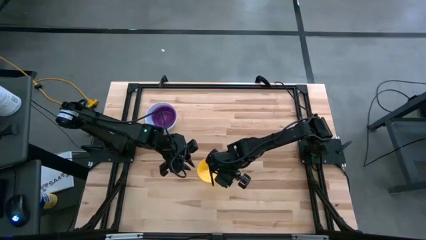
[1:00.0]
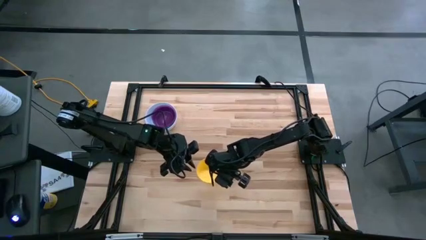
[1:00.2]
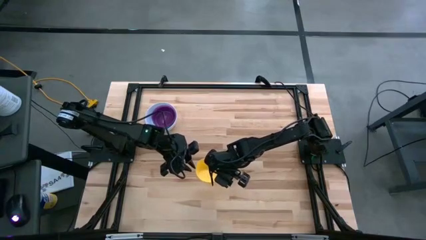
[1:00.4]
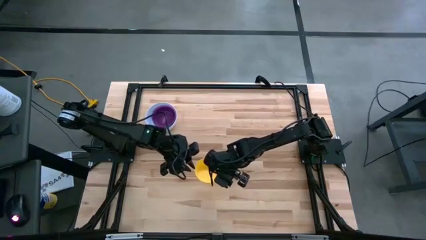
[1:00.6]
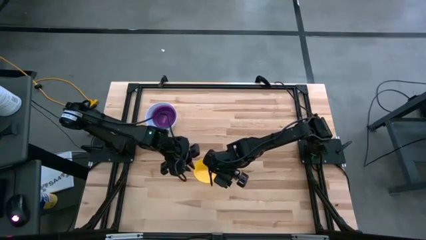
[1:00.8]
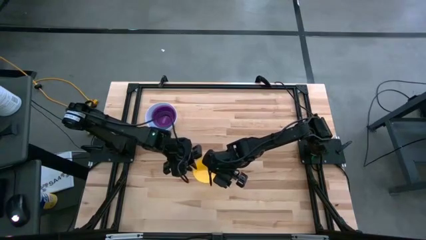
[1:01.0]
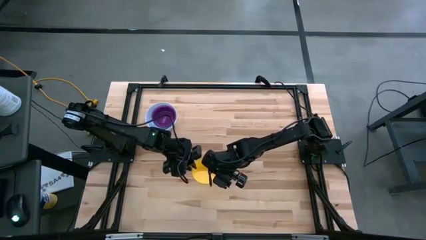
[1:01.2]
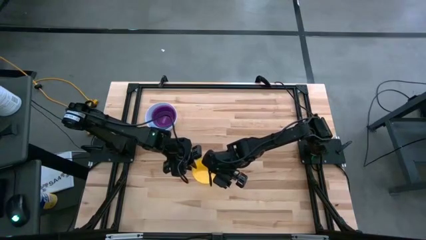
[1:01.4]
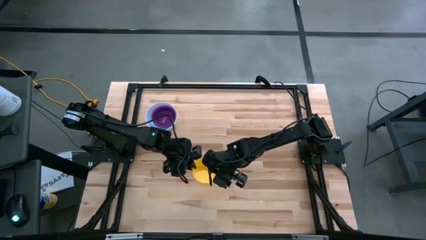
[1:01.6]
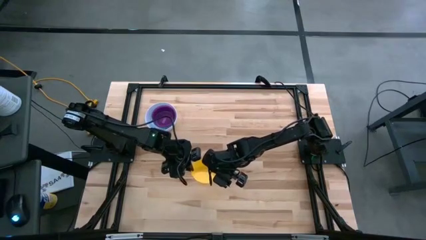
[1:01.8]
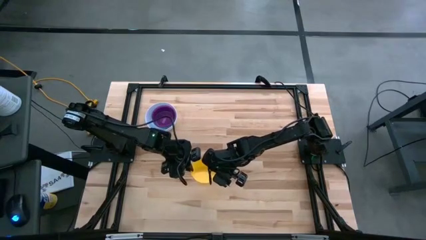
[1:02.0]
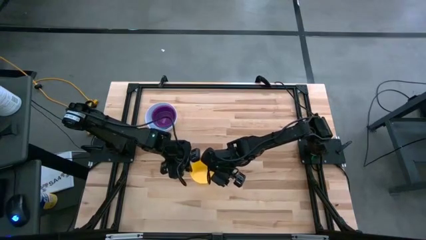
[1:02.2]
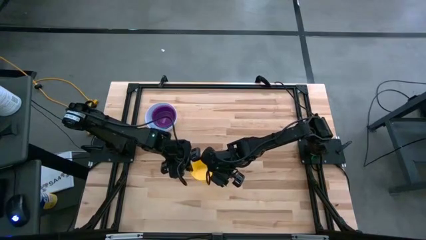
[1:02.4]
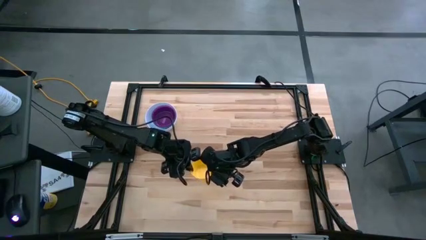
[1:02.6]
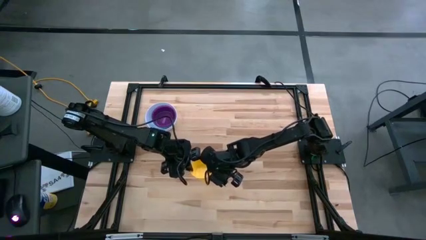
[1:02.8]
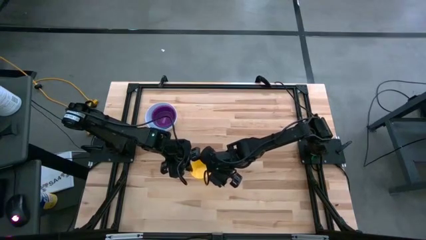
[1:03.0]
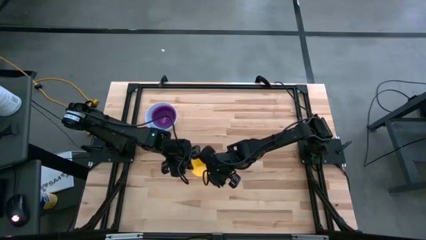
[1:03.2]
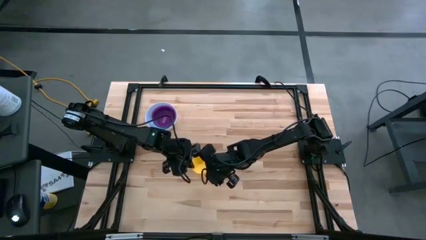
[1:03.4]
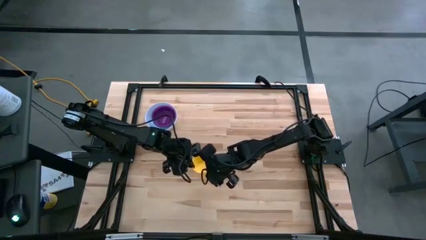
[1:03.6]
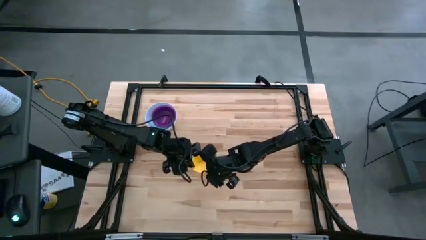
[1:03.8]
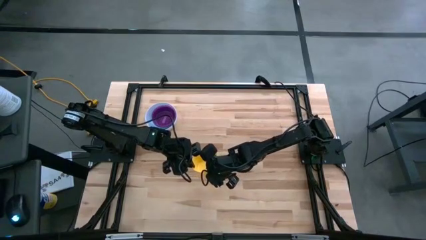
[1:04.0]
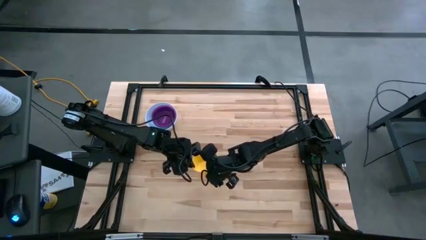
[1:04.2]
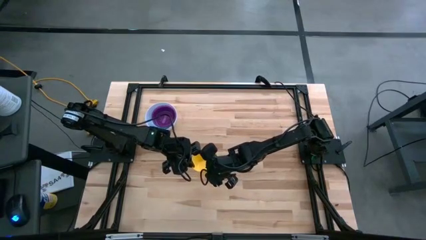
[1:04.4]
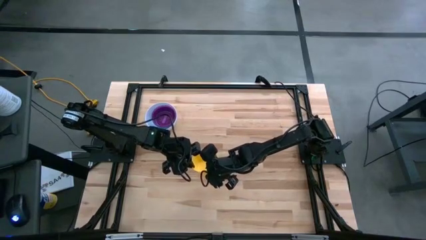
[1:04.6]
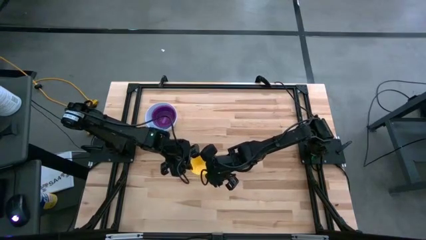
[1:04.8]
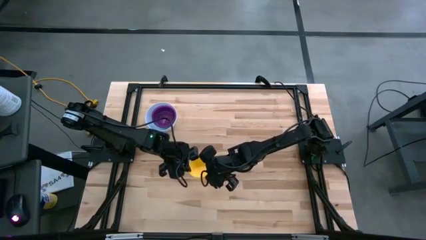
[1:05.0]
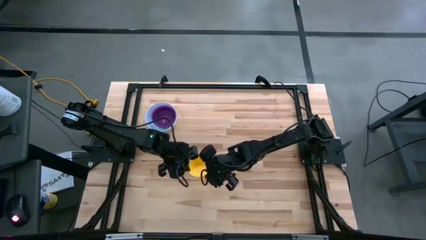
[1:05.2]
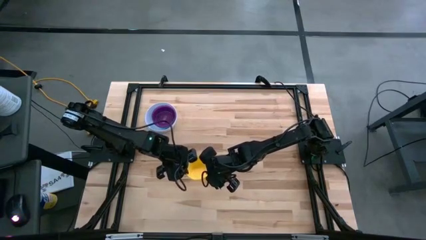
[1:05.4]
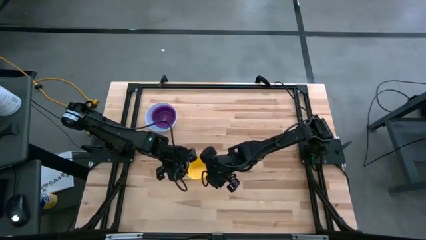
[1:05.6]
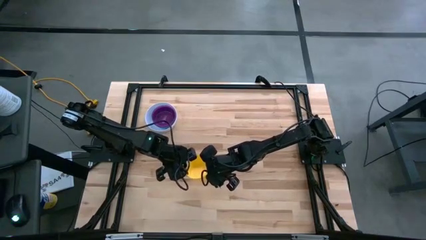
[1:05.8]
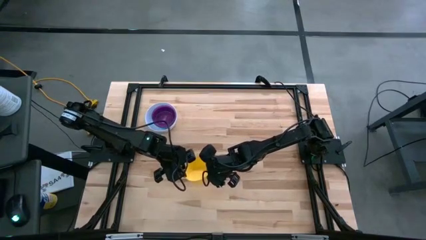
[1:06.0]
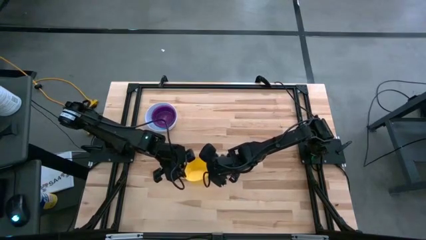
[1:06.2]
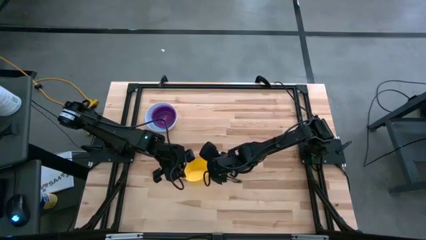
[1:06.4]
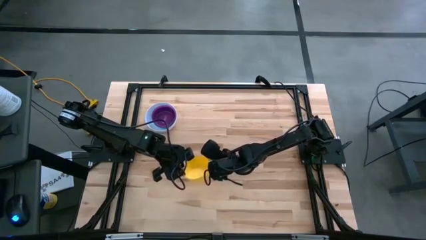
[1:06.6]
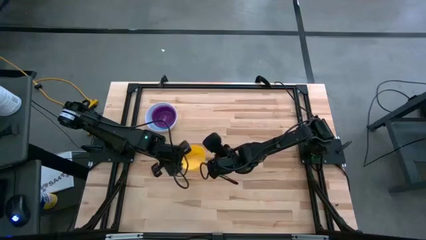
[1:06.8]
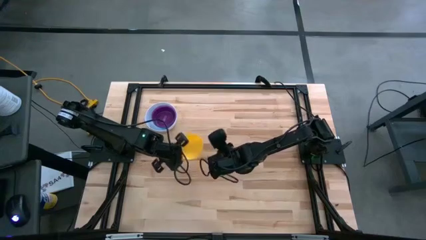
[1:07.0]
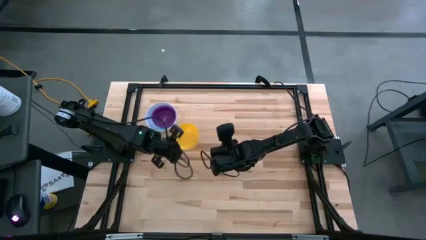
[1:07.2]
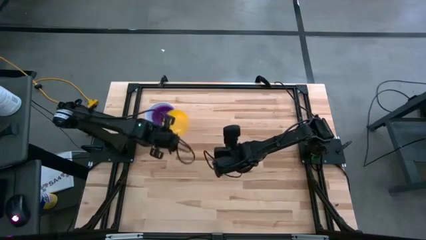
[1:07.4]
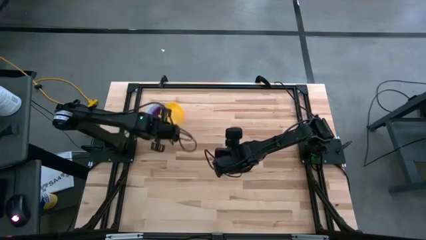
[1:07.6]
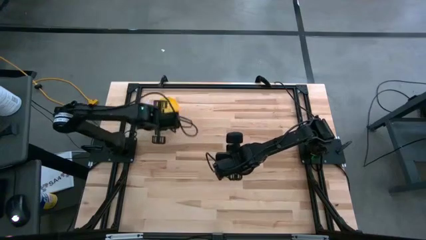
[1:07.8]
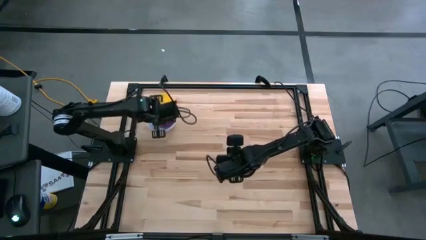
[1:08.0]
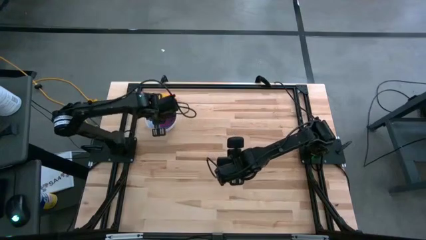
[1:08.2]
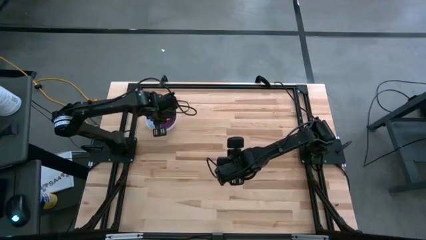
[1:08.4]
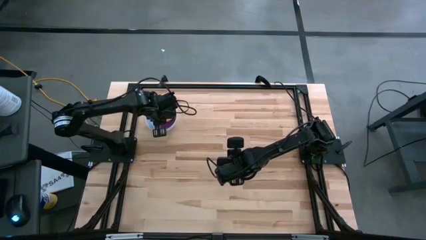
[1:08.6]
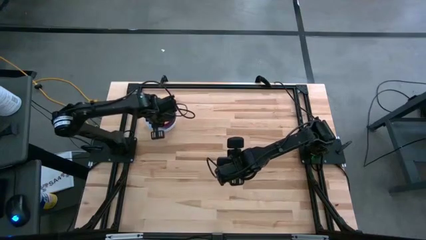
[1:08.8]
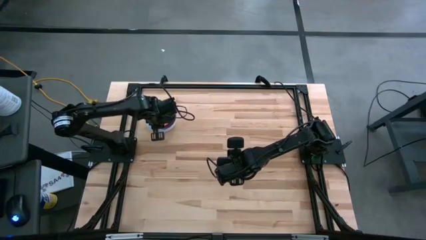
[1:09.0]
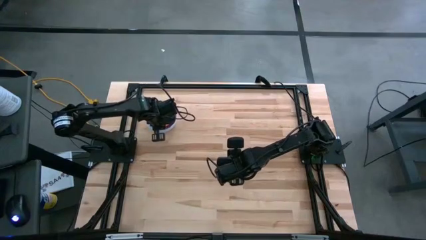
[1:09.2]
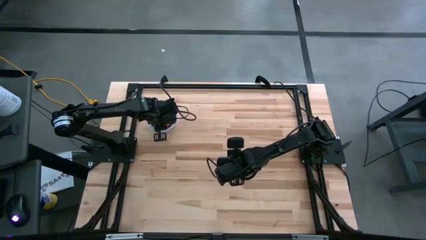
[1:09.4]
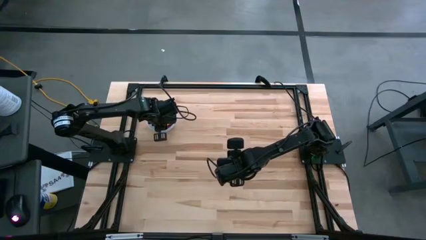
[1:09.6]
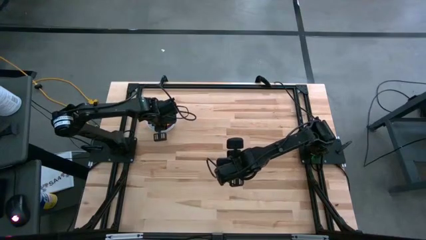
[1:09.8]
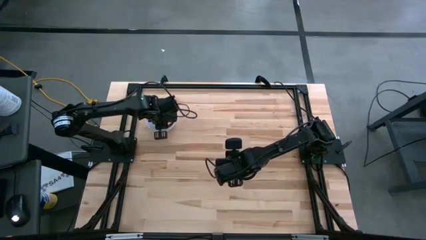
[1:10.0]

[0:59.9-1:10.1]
Stack the yellow bowl on top of the violet bowl
